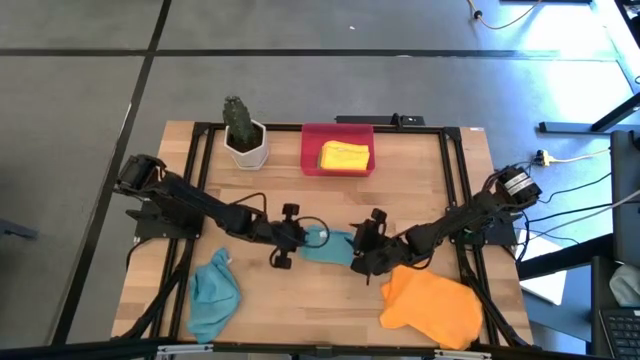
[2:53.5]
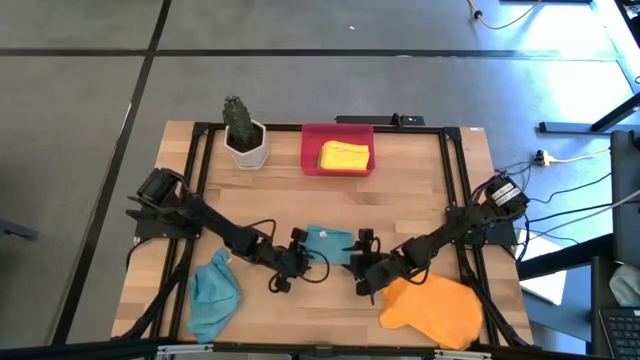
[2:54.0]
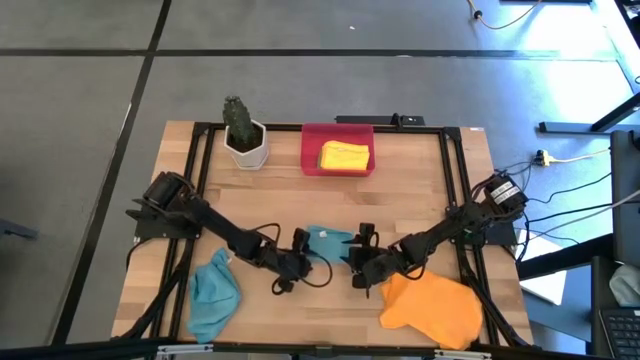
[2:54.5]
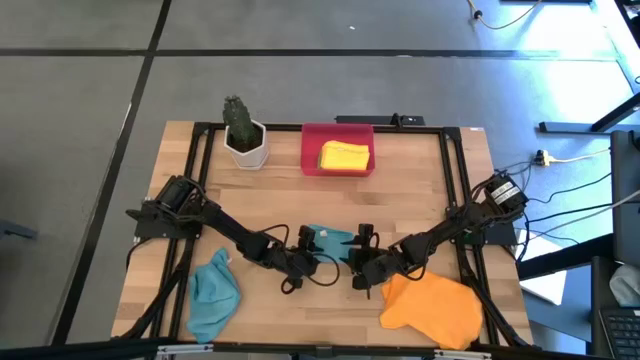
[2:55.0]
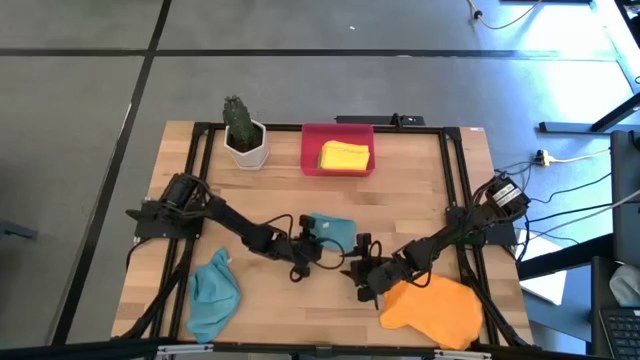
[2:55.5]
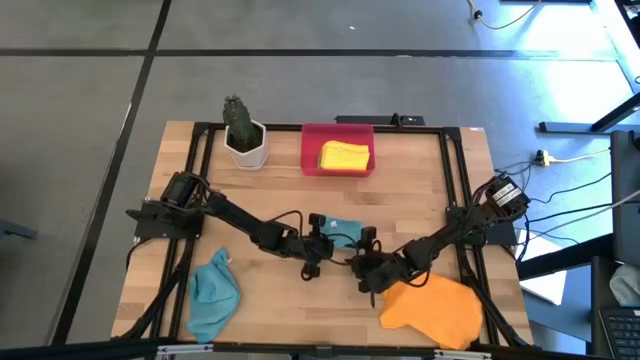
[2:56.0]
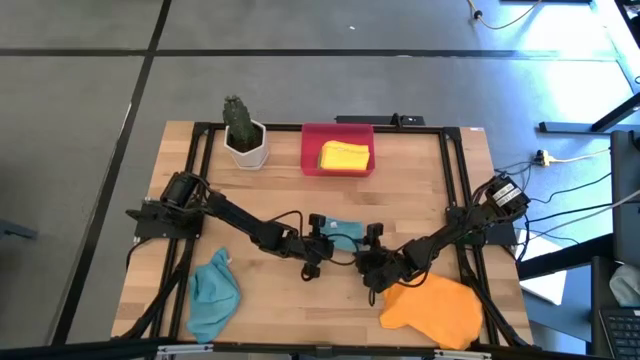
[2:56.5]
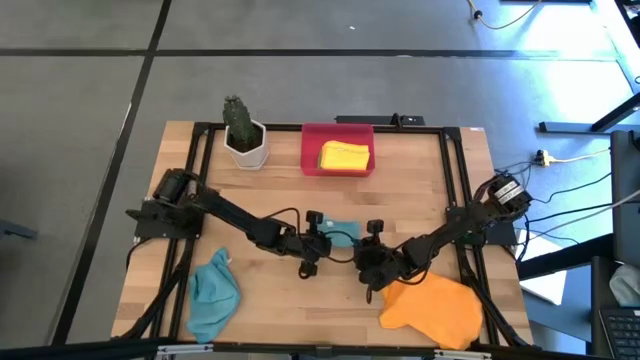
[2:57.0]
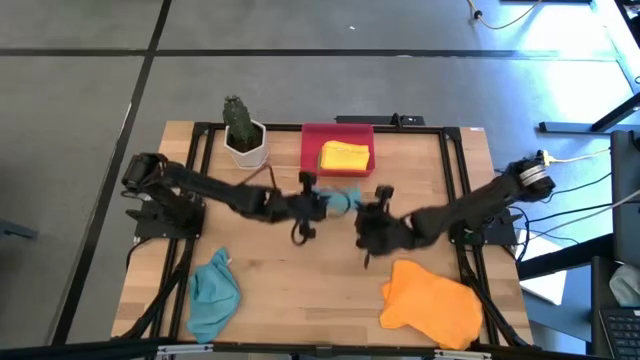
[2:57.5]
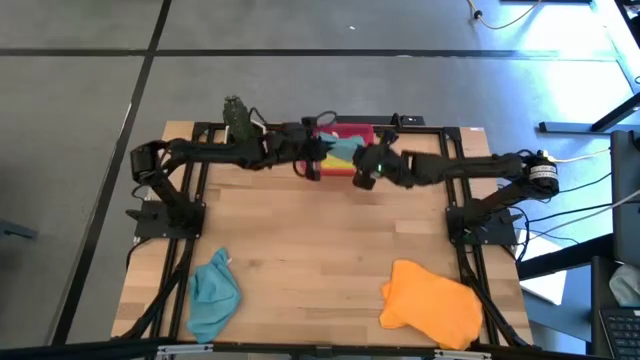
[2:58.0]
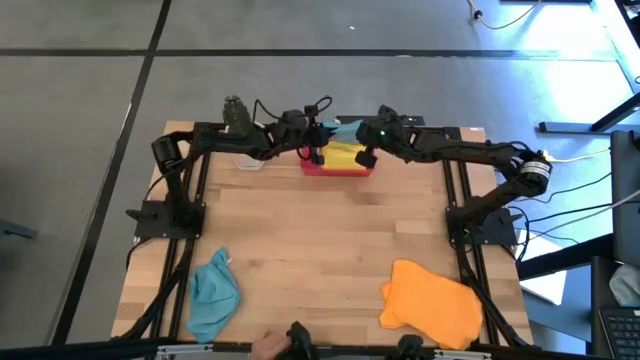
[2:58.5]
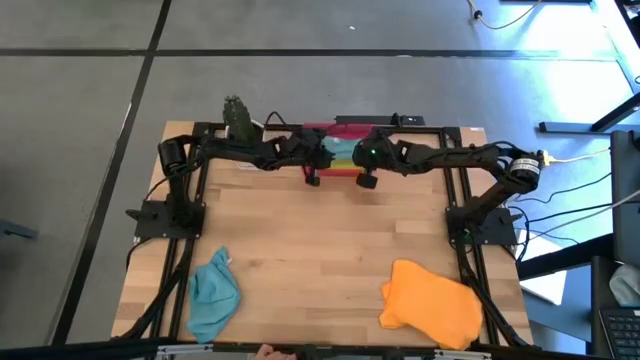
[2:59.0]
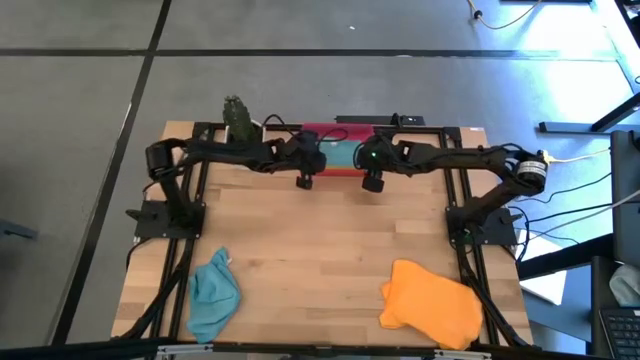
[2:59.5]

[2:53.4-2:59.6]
Task: Fold microfiber towels
Put the top blue microfiber cloth into the red bin

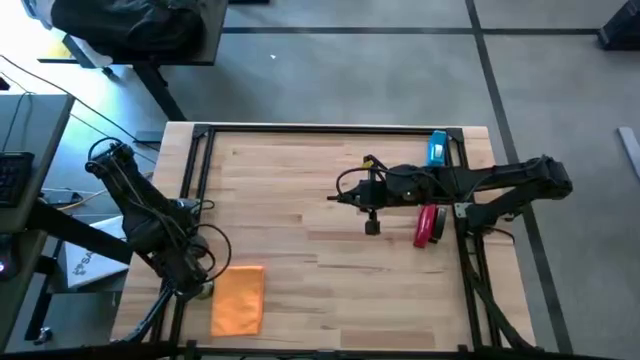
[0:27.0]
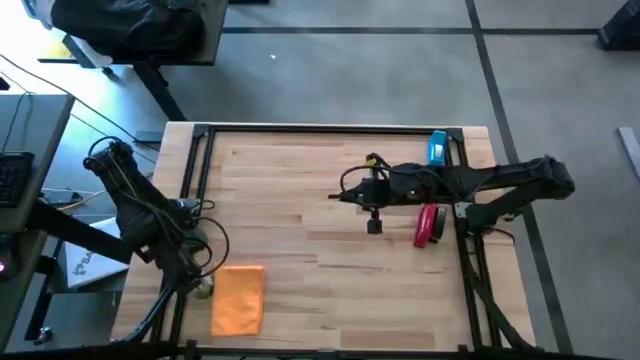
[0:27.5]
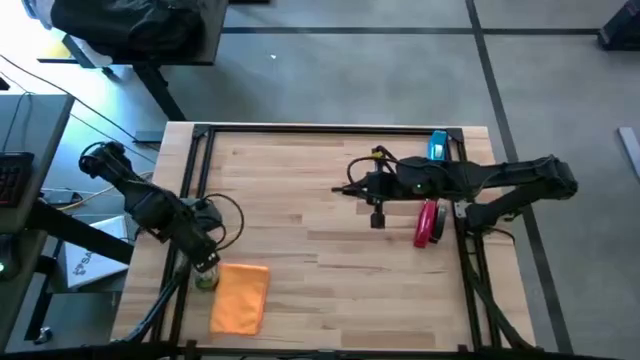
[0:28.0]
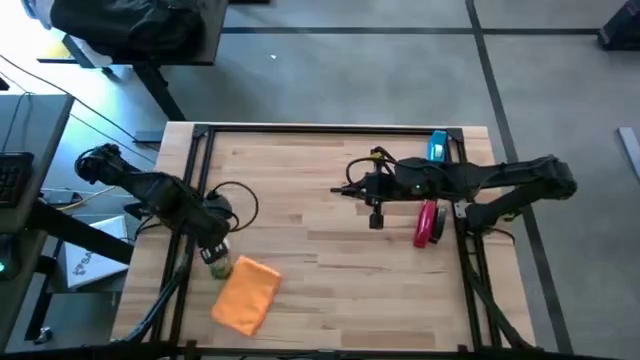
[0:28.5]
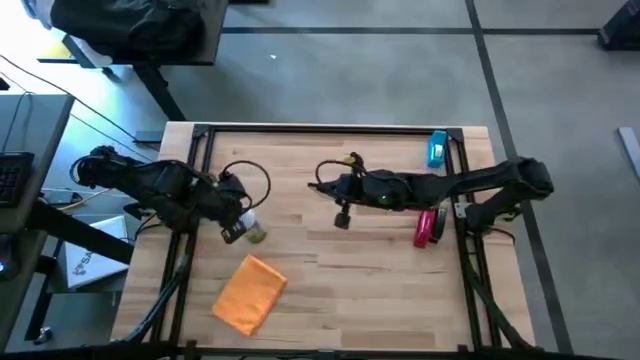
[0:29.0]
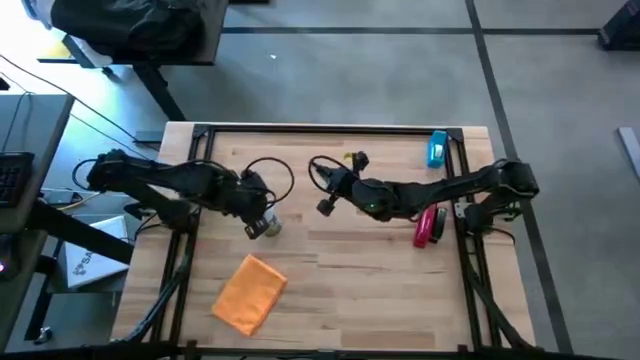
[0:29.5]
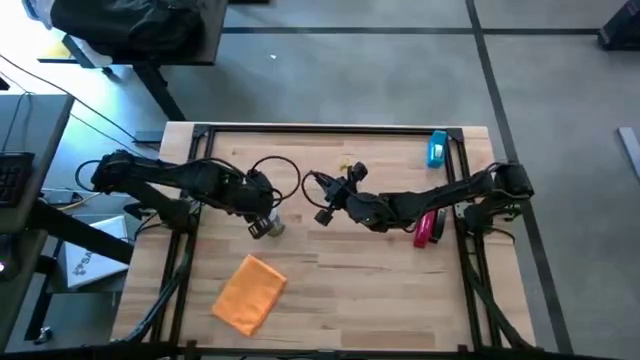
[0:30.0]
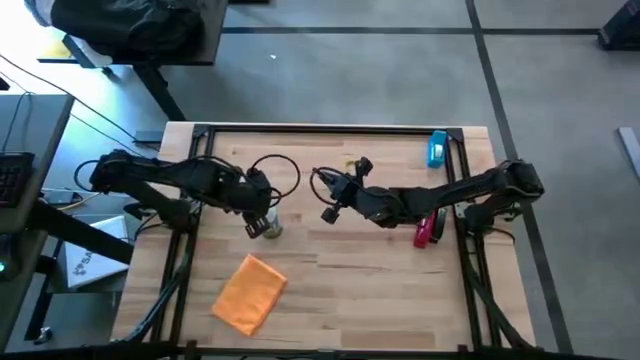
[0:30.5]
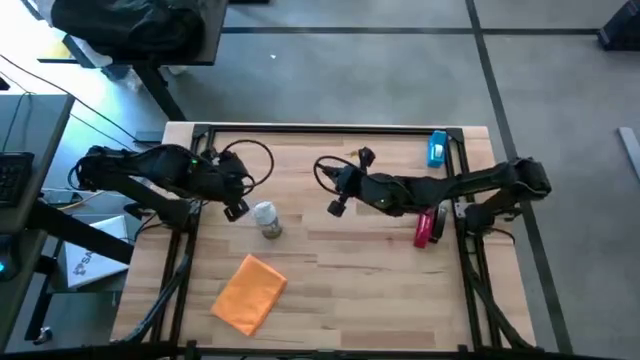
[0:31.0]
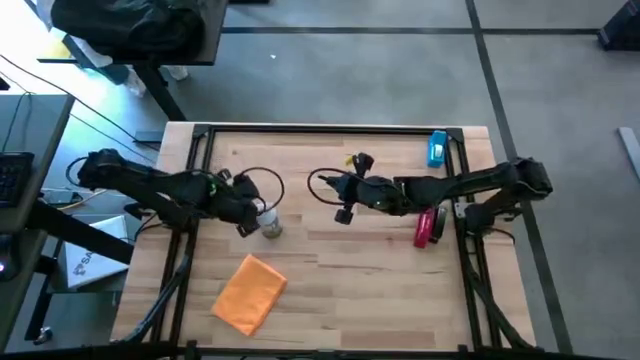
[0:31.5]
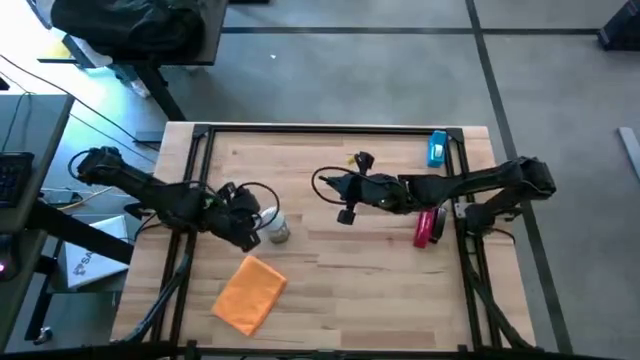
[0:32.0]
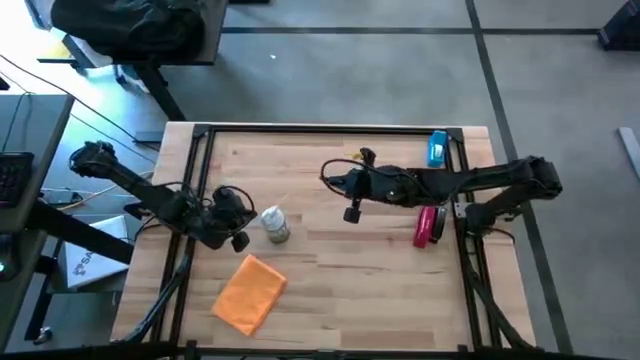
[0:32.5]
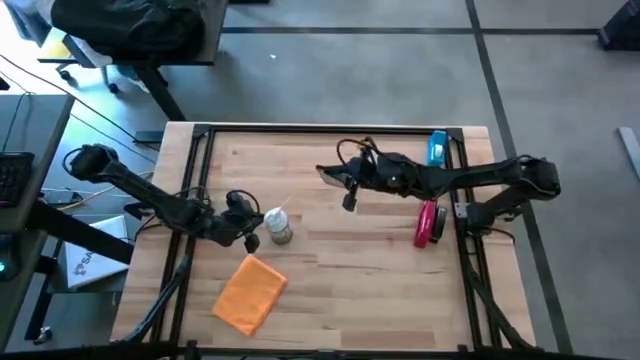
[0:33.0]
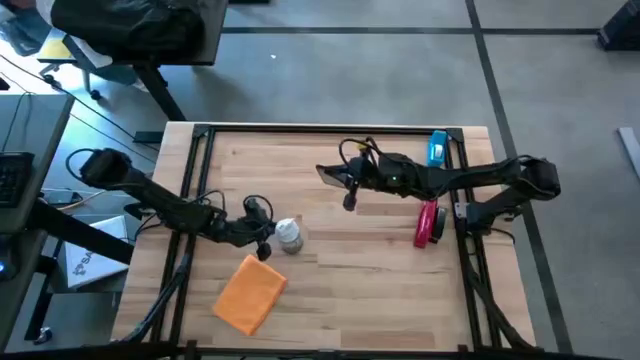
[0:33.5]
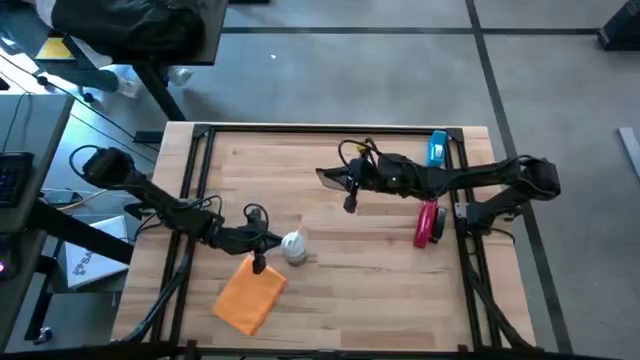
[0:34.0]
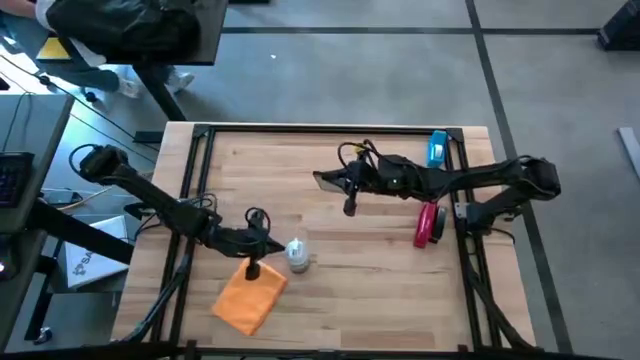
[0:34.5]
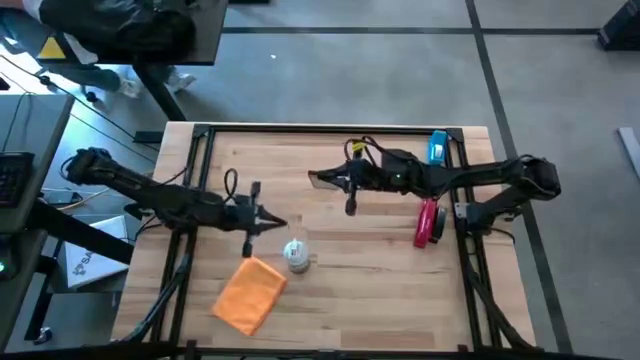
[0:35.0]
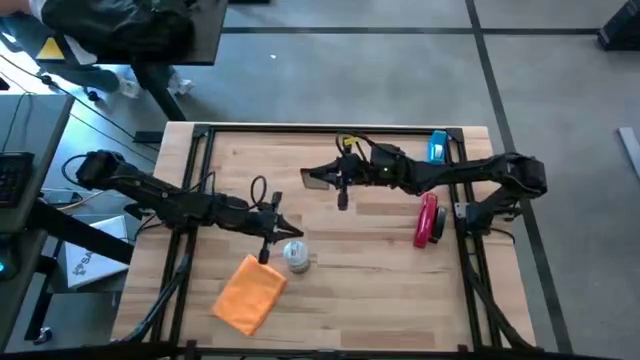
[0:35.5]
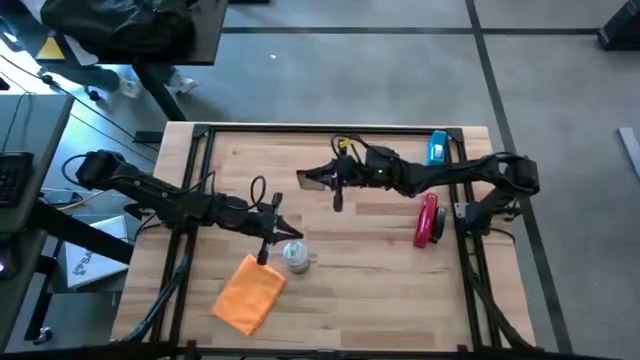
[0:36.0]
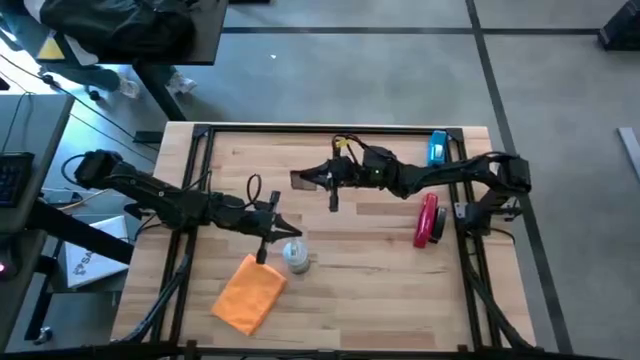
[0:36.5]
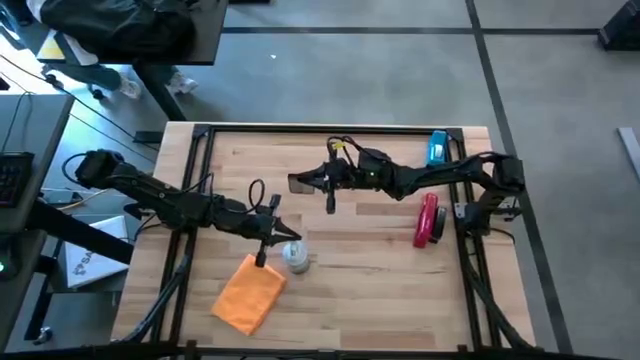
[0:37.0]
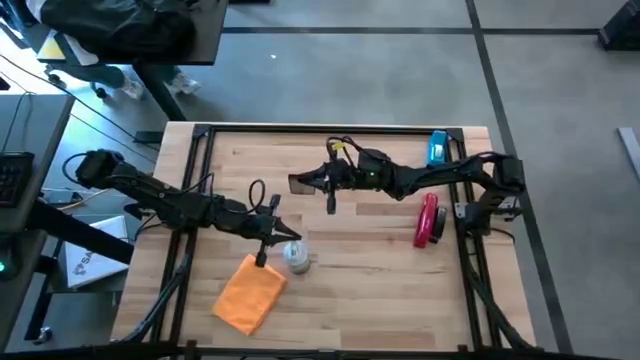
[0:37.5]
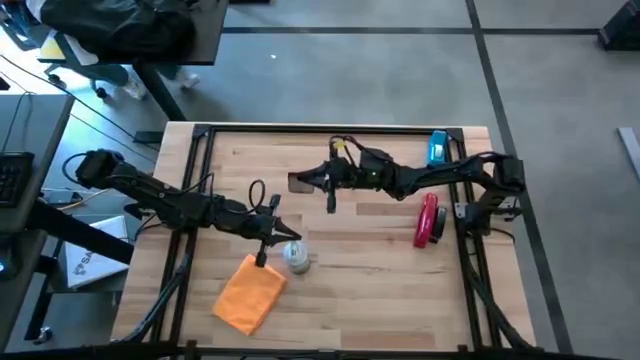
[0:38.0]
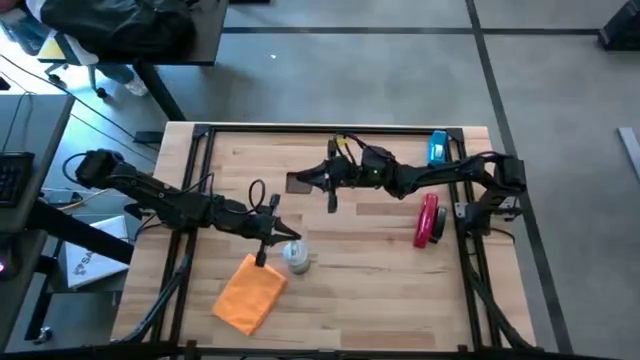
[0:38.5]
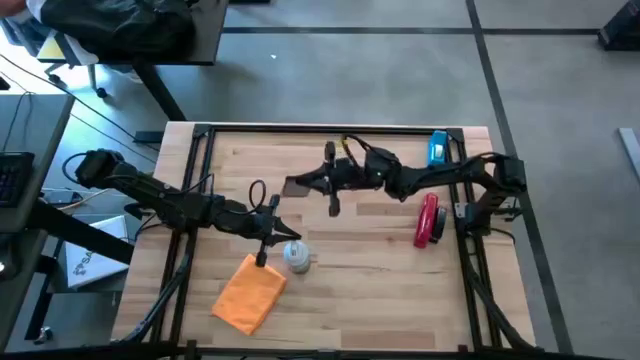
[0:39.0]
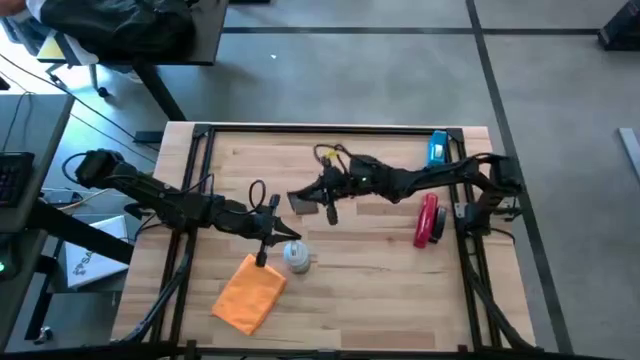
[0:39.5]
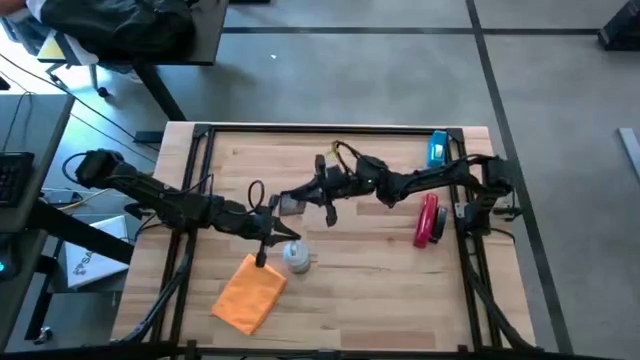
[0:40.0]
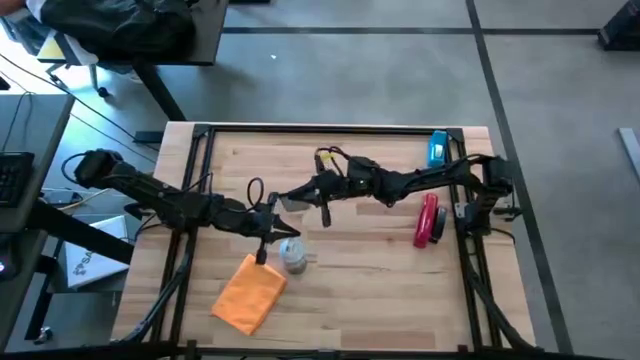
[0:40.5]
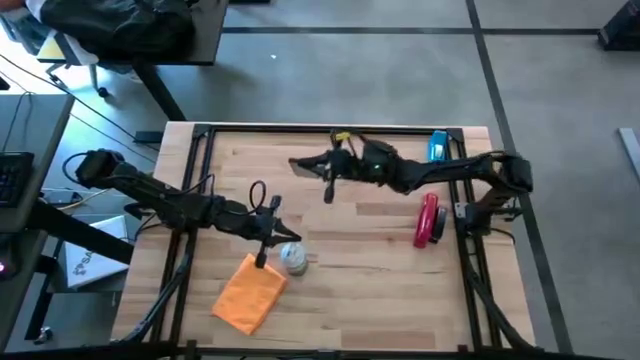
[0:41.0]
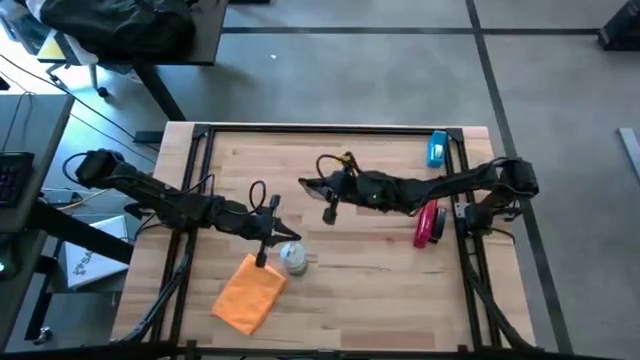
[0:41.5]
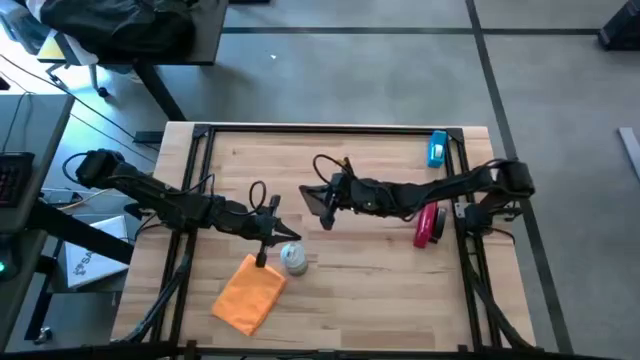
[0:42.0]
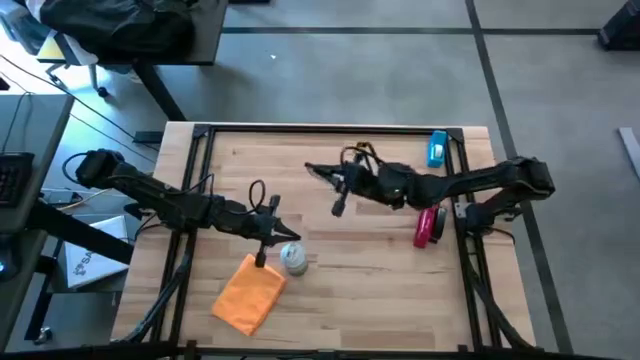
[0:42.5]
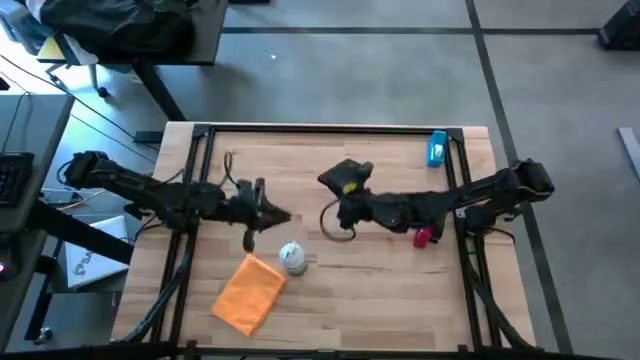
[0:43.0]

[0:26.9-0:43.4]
Task: Apply microfiber cloth
Spray the cellphone using the spray bottle
